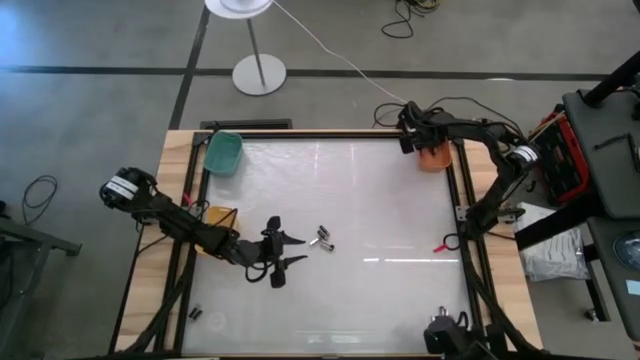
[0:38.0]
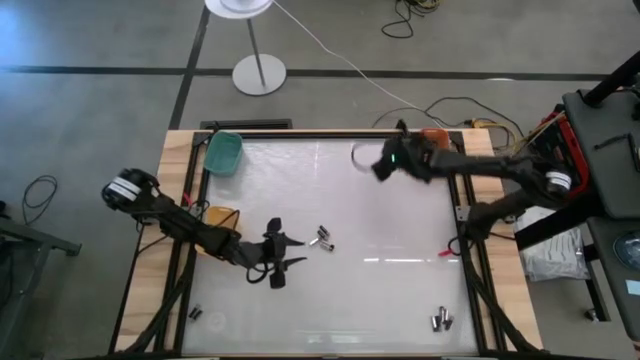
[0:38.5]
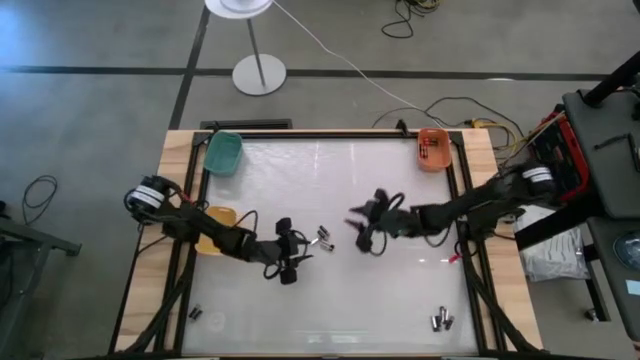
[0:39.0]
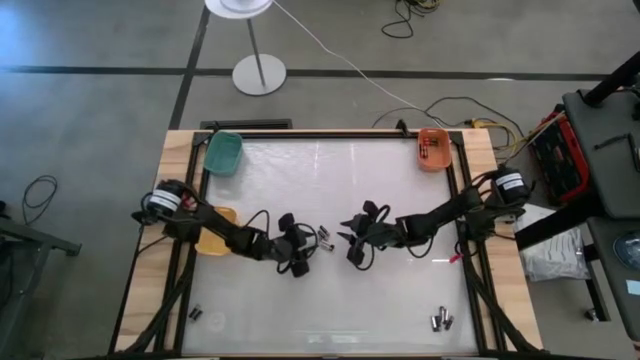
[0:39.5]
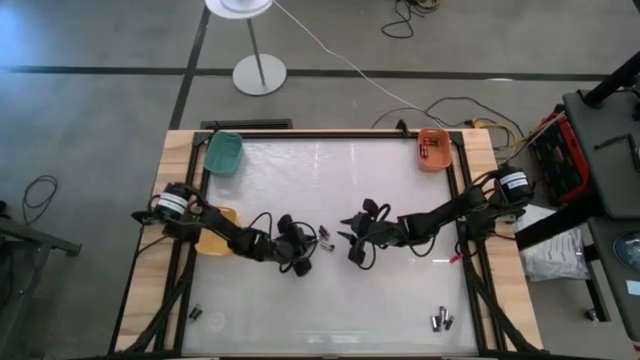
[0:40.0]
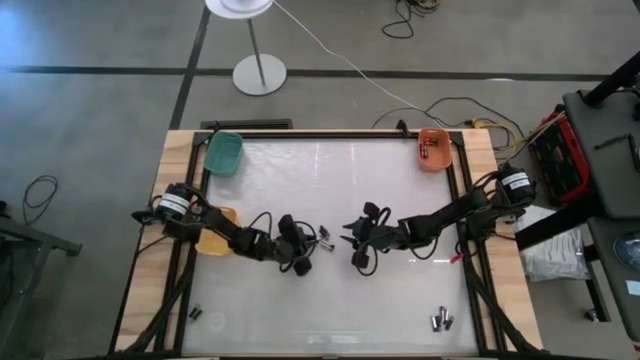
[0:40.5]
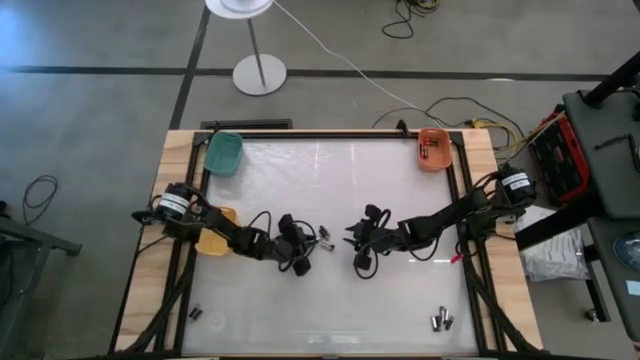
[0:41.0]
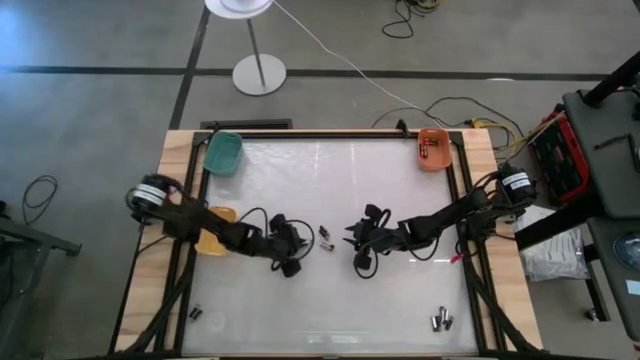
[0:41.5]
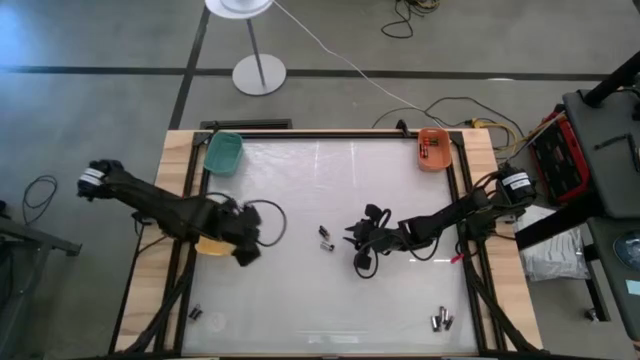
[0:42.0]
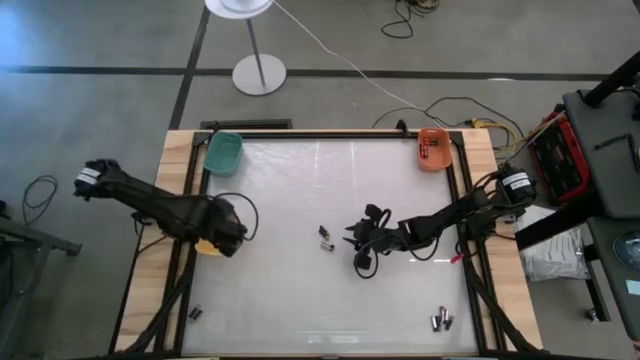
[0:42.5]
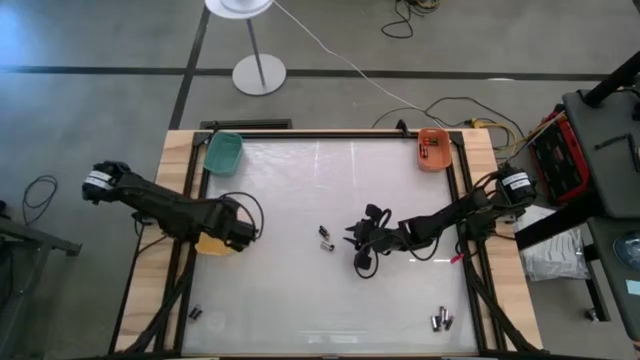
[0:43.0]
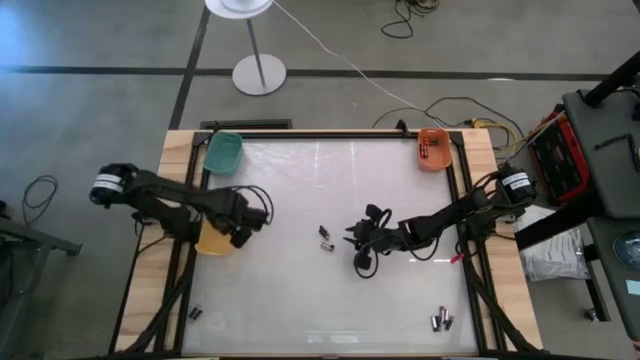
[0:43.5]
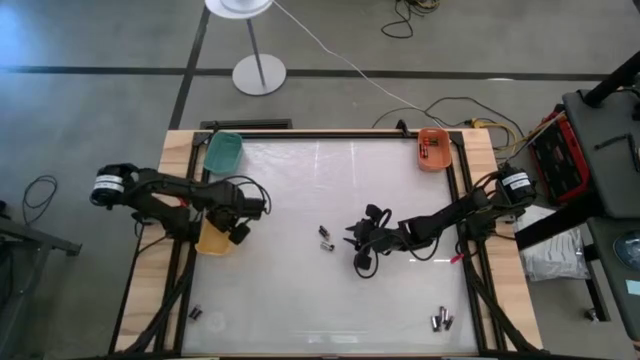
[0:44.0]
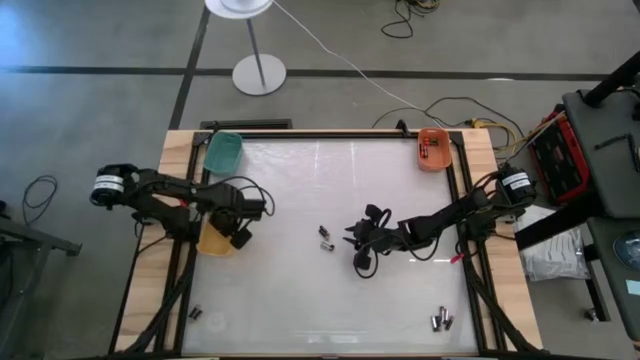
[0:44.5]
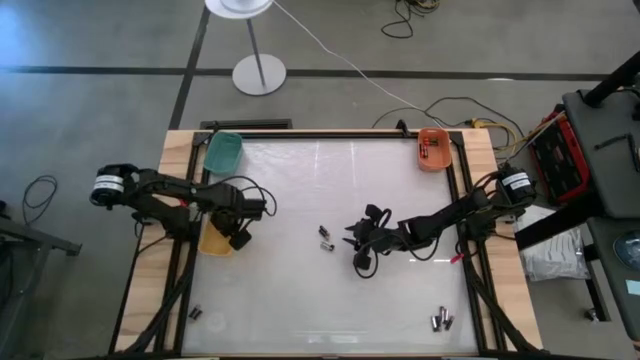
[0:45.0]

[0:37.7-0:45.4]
Task: Sort batteries
Put the silver battery into the yellow bin

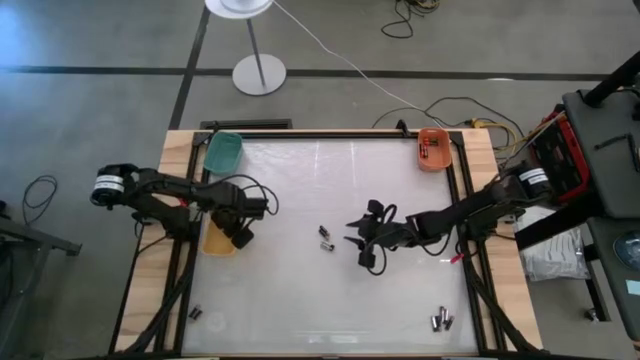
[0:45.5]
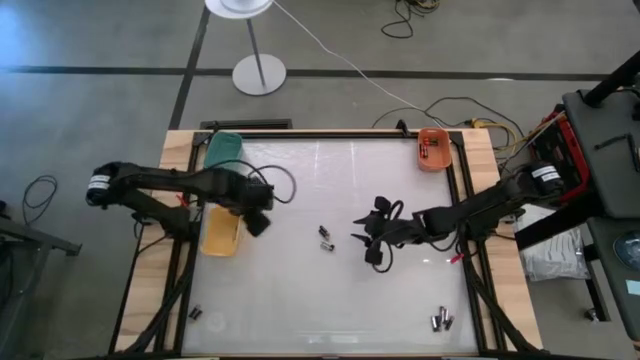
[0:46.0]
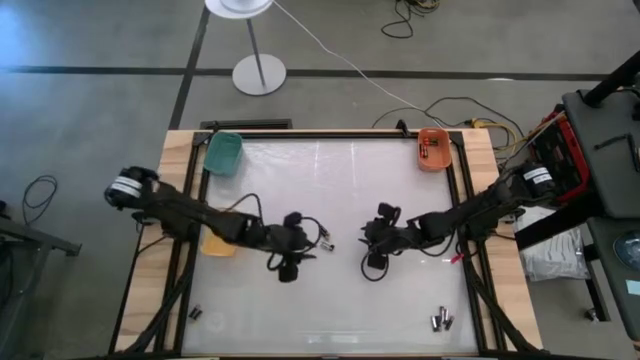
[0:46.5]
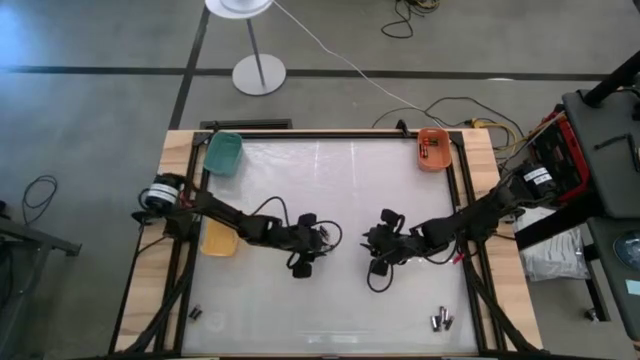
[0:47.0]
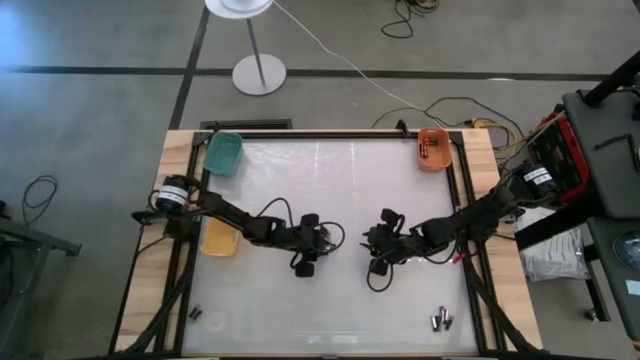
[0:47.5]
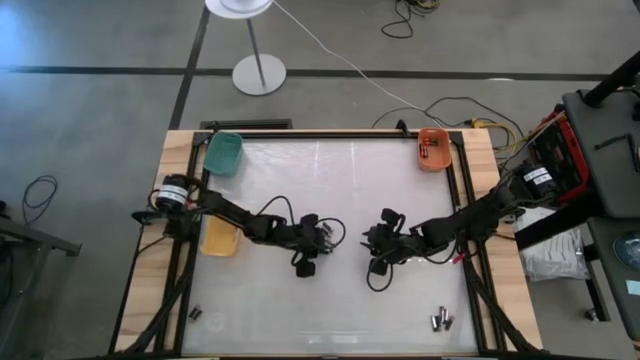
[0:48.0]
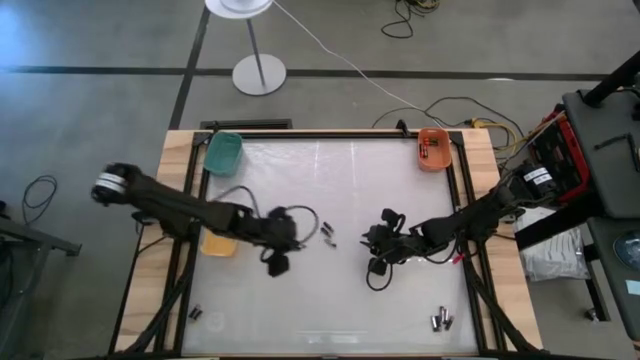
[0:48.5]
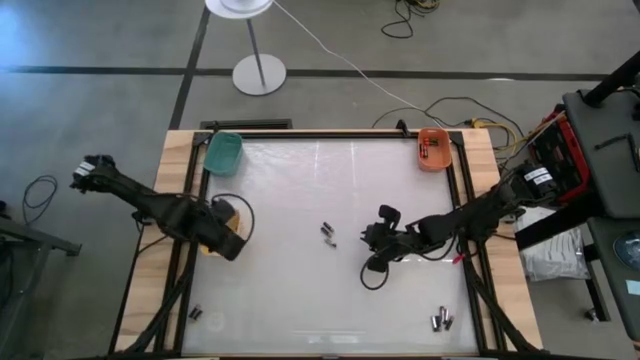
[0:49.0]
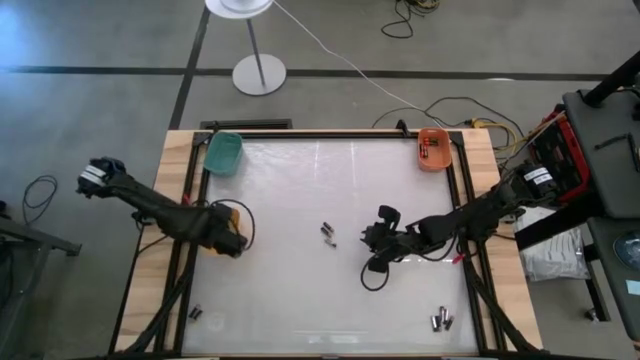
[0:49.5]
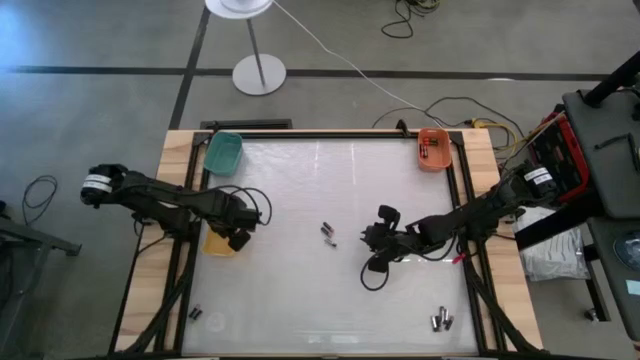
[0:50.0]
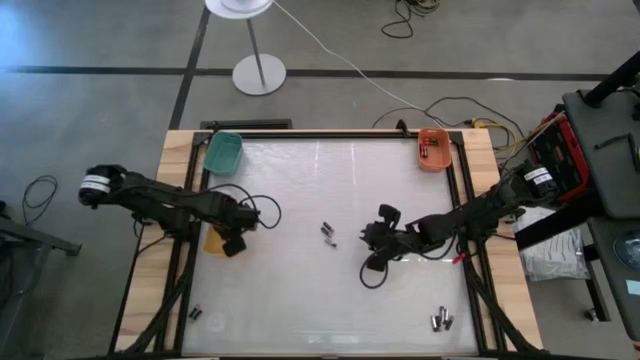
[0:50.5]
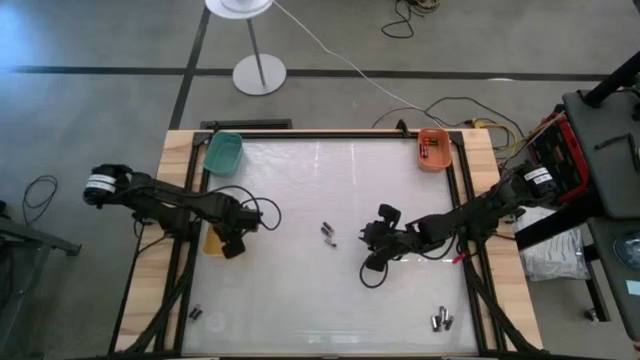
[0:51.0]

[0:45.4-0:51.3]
Put the silver battery into the yellow bin

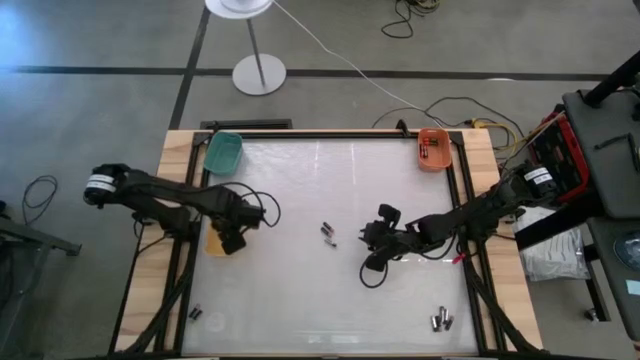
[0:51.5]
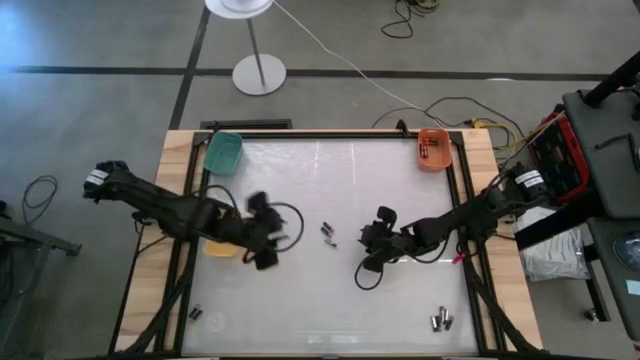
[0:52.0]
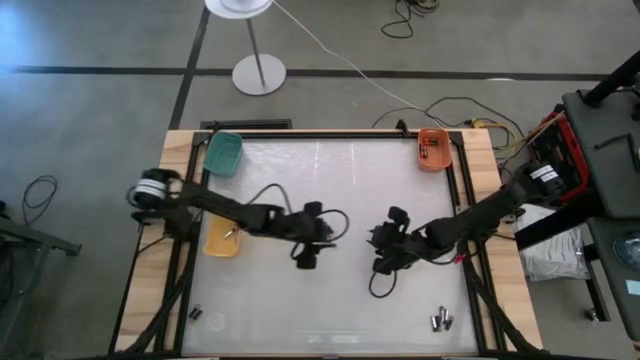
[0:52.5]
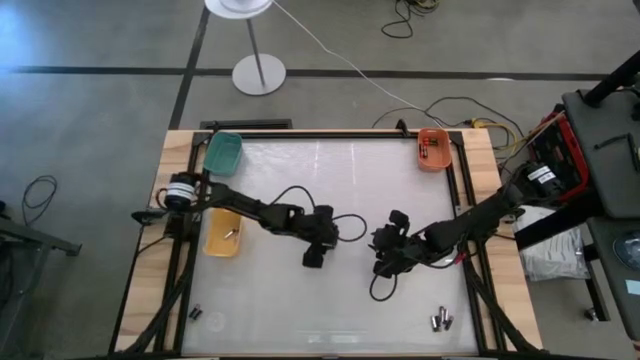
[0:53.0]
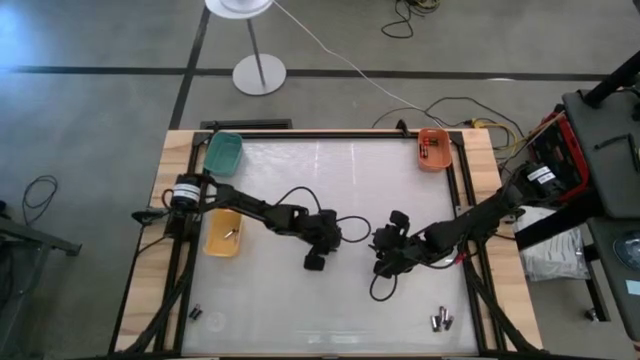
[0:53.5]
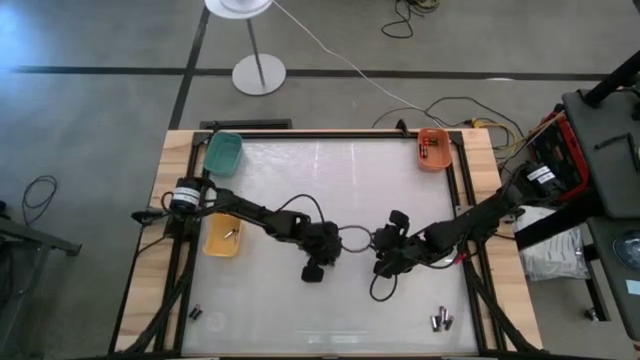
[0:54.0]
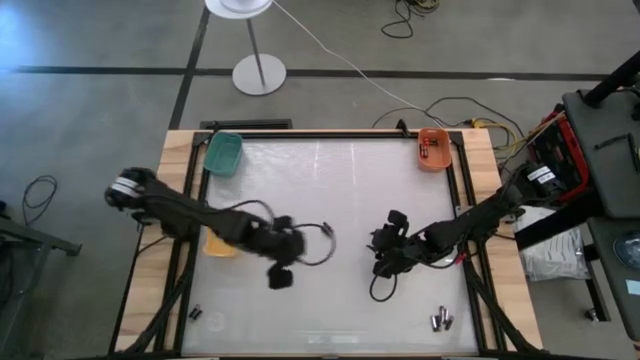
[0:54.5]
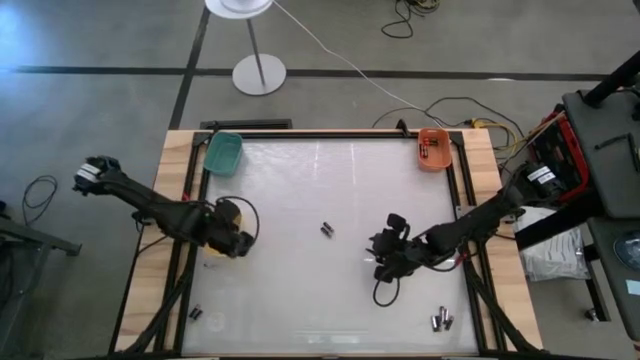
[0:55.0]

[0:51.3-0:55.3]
Put the silver battery into the yellow bin

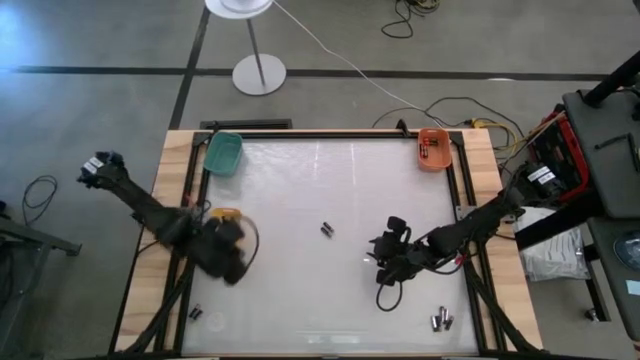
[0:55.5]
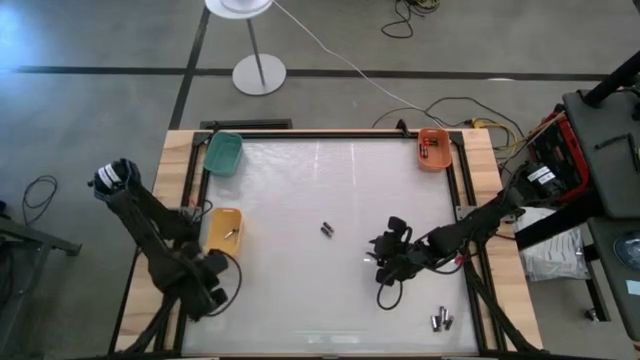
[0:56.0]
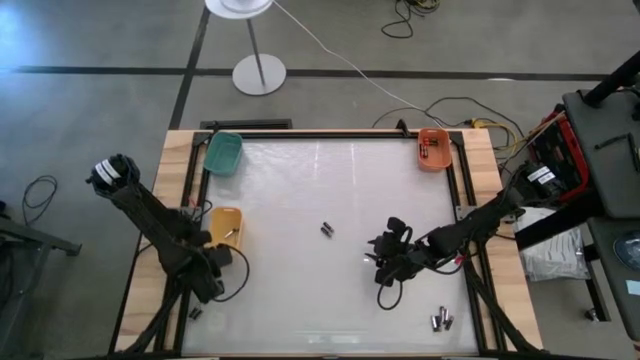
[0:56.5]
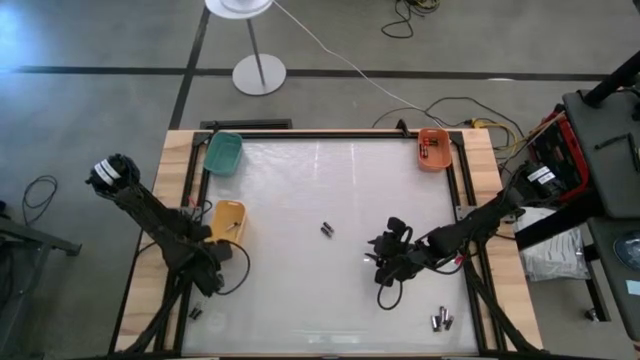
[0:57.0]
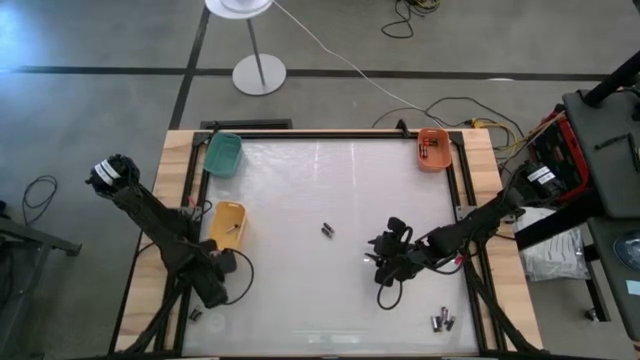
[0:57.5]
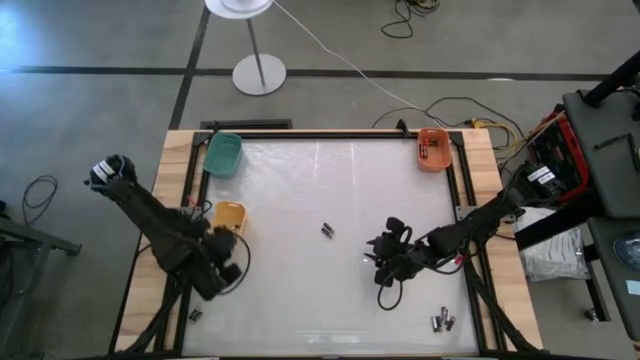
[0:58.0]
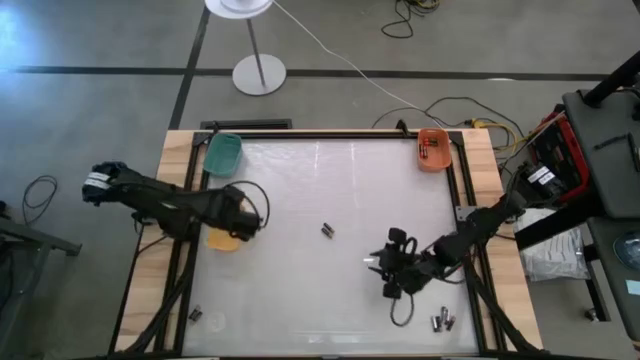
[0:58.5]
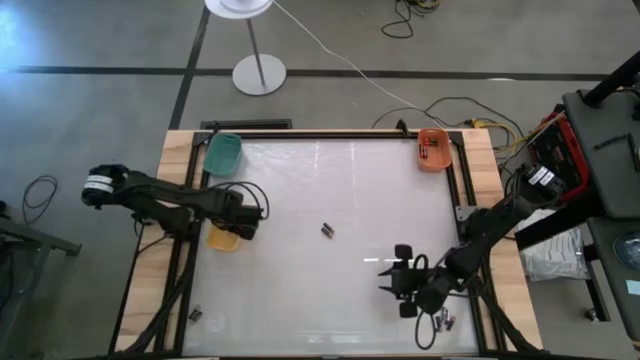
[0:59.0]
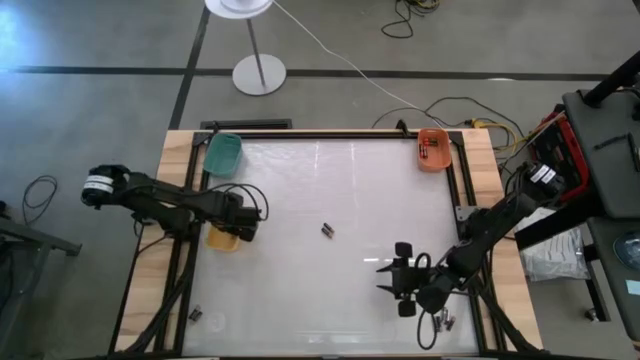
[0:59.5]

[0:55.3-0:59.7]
Put the silver battery into the yellow bin
